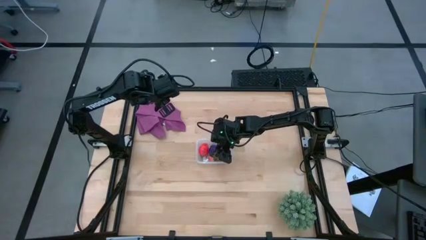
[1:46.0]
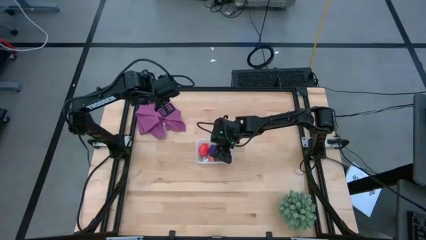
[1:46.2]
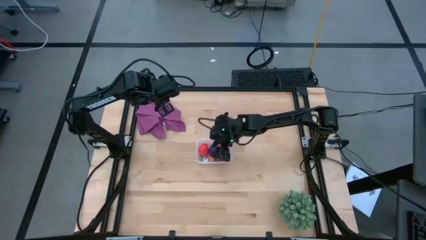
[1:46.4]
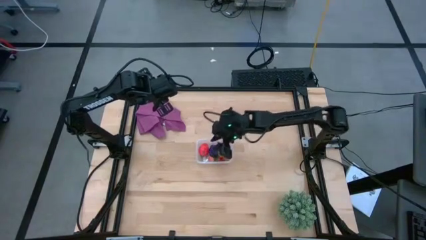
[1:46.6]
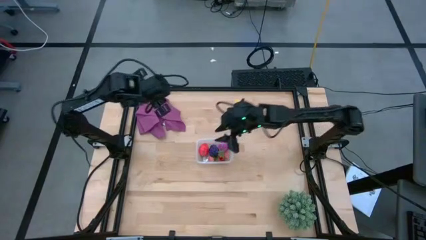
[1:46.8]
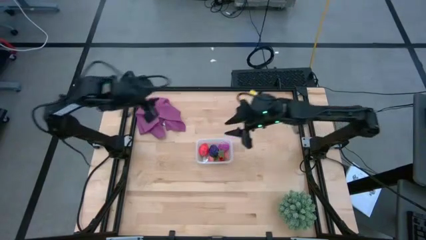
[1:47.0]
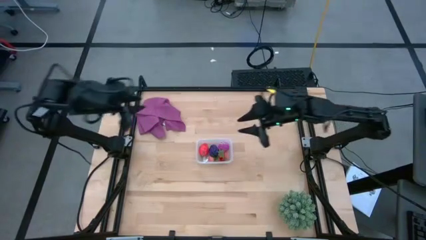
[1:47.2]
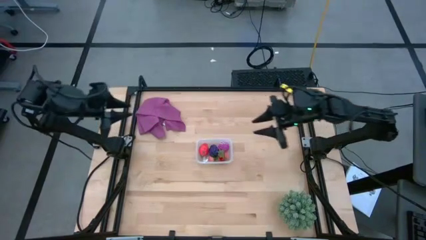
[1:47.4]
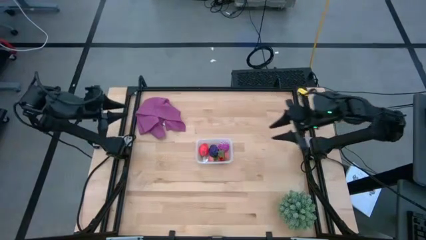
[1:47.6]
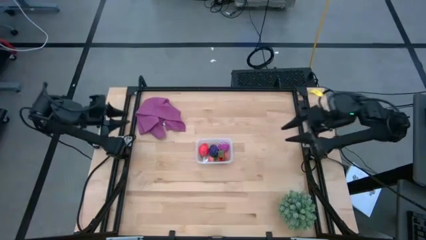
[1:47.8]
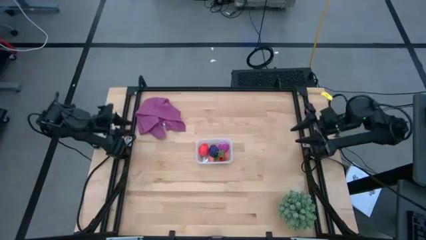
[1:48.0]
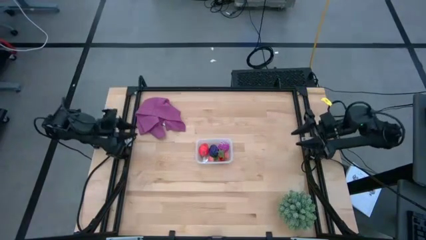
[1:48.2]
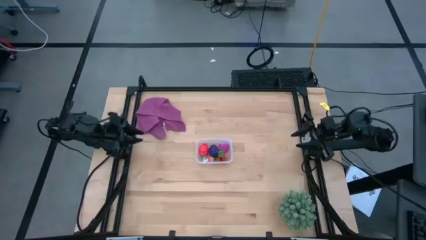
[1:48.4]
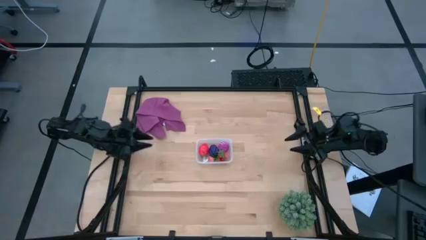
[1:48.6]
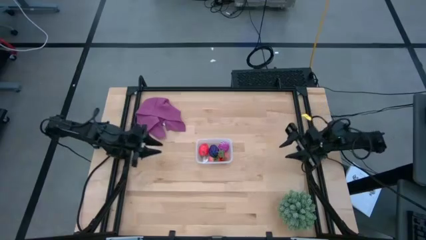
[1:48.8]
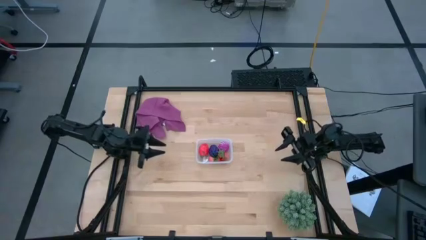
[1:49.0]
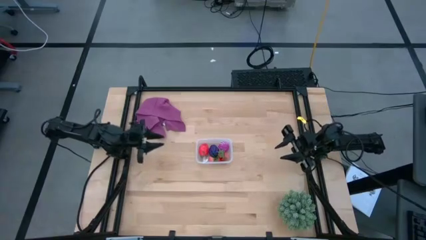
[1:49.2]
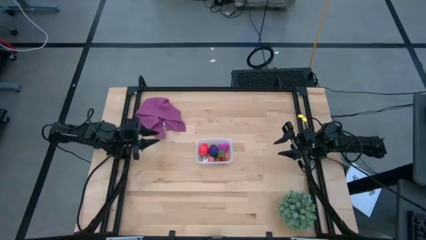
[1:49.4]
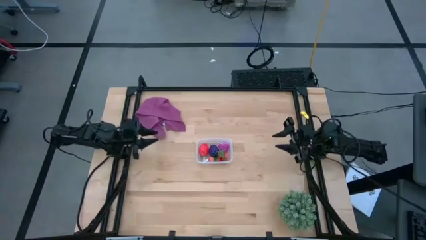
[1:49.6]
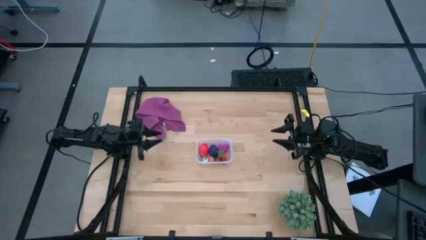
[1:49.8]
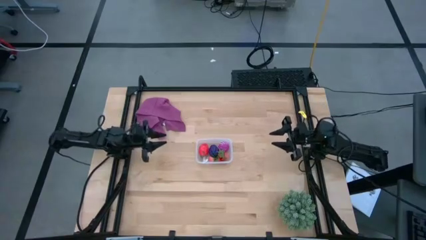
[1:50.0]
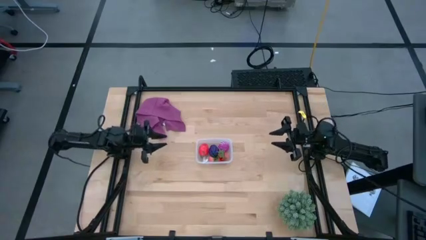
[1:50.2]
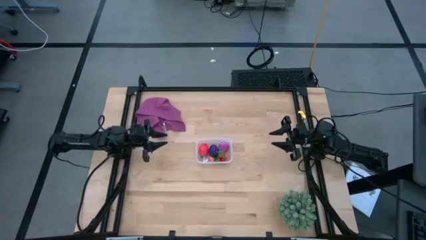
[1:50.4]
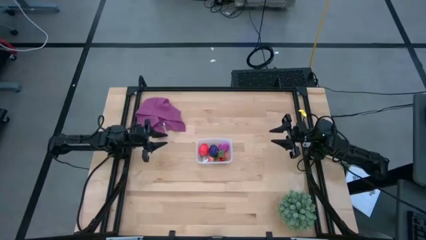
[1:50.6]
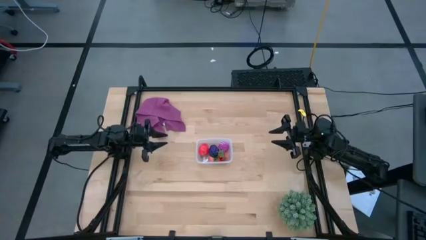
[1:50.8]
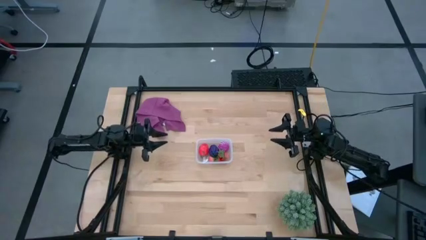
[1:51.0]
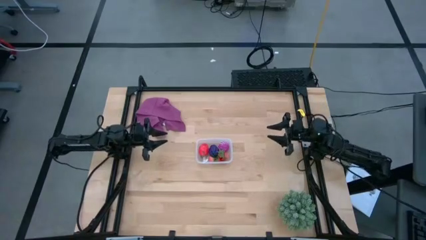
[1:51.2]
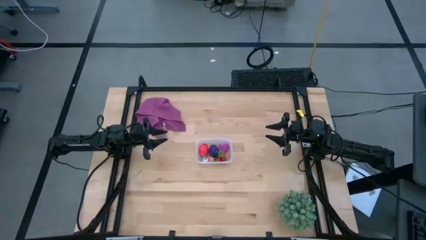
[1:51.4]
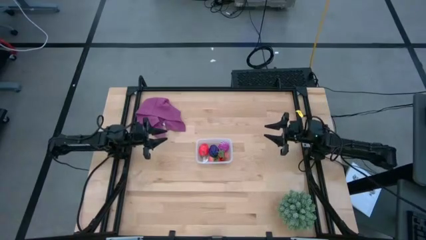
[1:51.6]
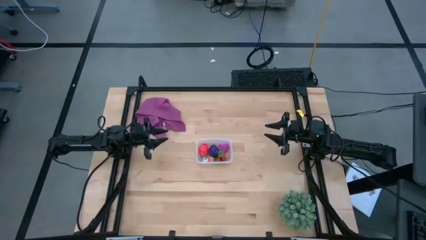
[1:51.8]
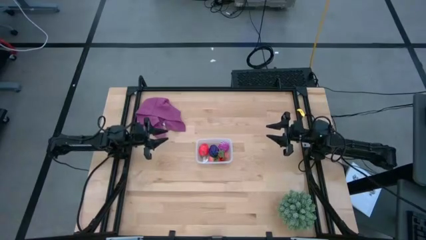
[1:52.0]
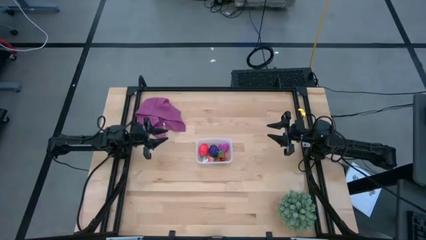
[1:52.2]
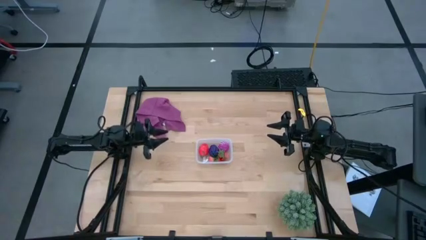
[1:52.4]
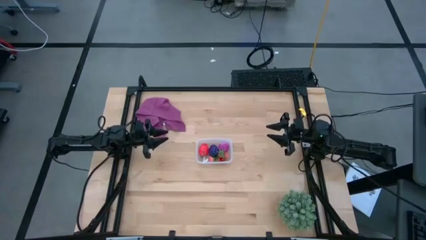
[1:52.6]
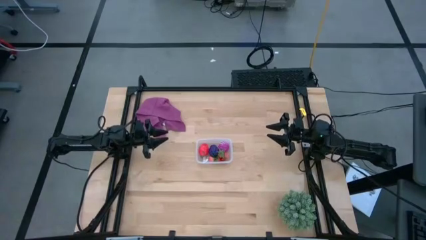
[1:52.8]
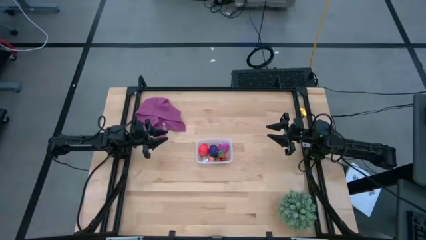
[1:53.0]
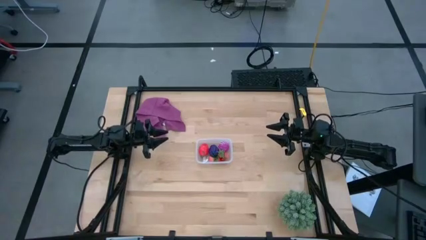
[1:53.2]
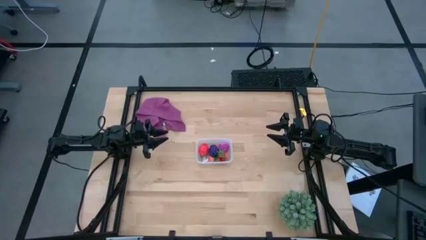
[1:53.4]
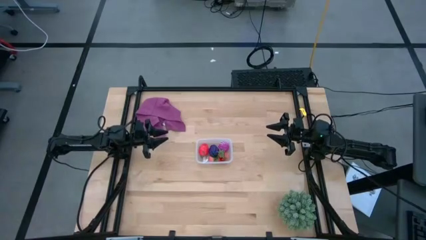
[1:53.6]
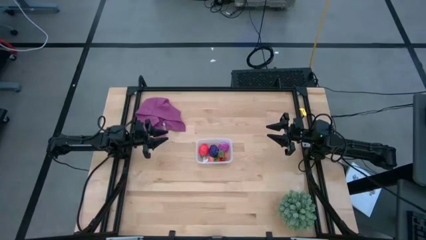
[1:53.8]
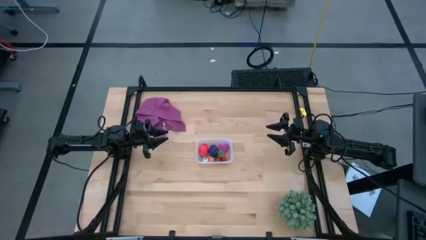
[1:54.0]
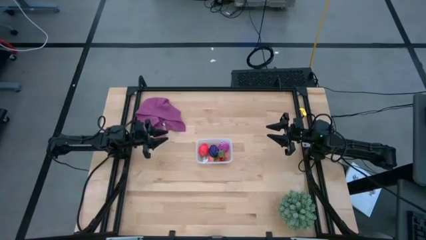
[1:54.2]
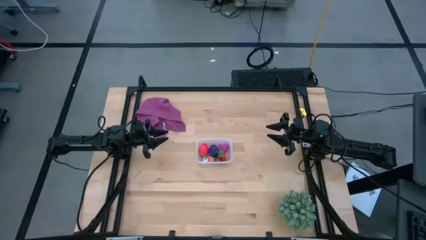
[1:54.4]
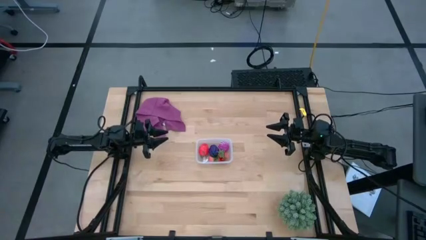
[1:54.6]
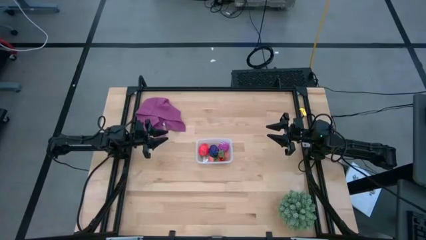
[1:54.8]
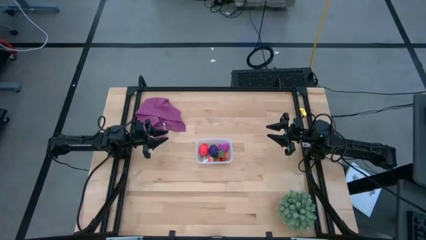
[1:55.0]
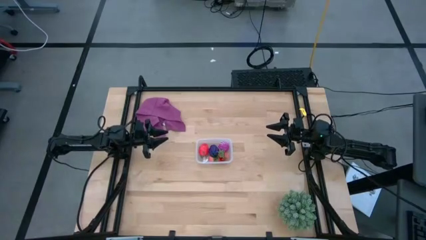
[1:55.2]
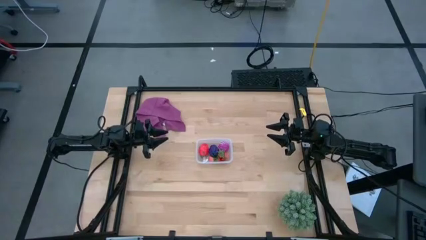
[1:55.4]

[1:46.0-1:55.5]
Task: Pick and placing Produce into tupperware
Return to Home Position

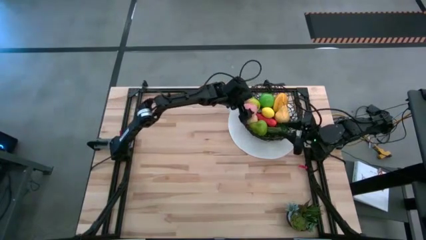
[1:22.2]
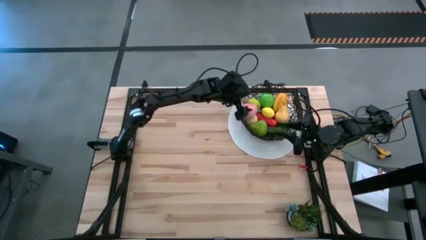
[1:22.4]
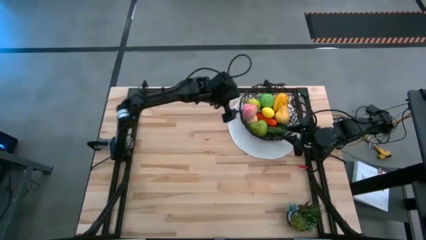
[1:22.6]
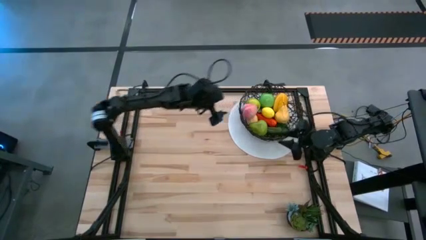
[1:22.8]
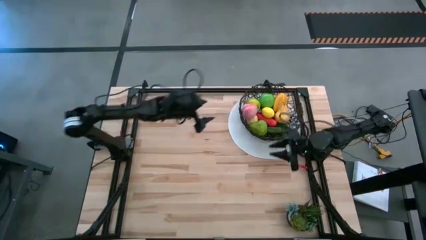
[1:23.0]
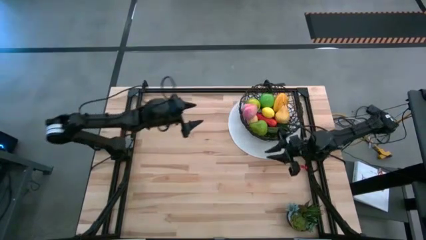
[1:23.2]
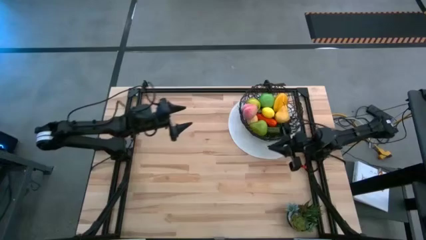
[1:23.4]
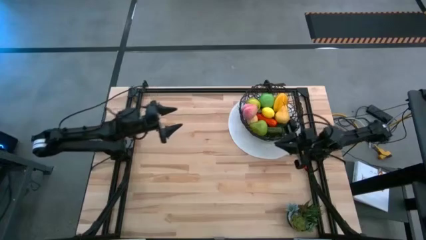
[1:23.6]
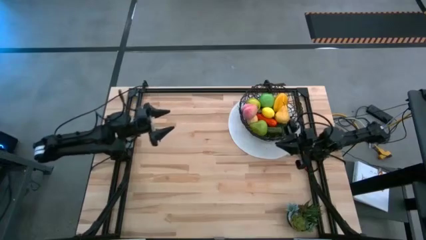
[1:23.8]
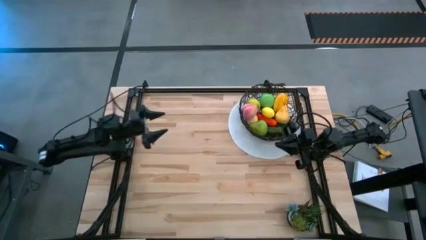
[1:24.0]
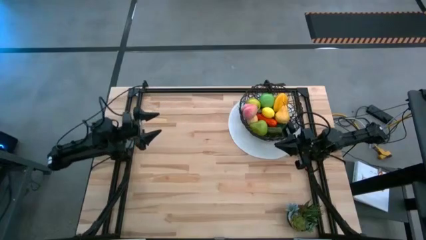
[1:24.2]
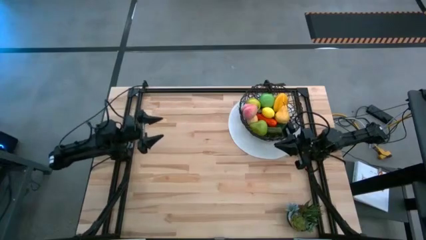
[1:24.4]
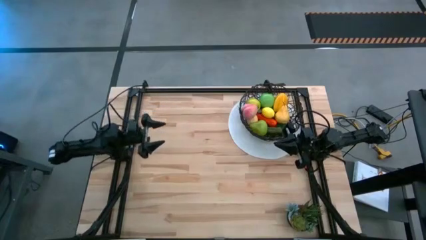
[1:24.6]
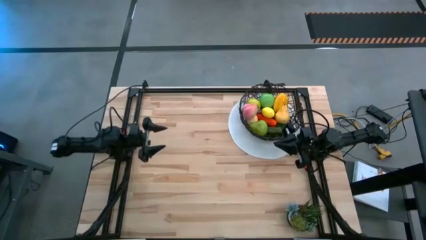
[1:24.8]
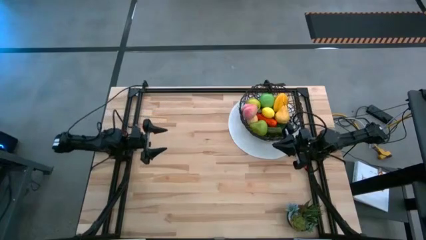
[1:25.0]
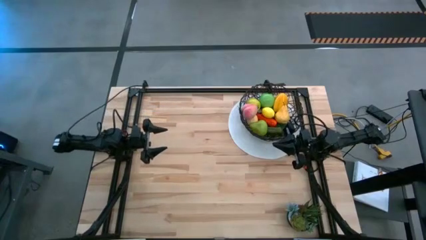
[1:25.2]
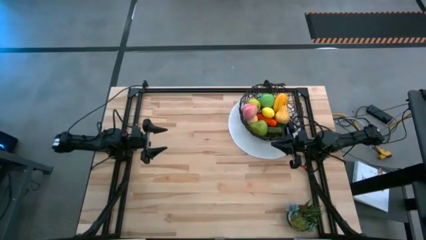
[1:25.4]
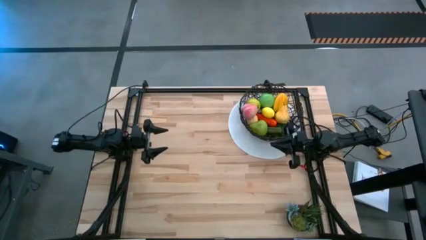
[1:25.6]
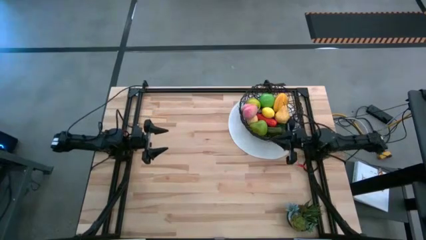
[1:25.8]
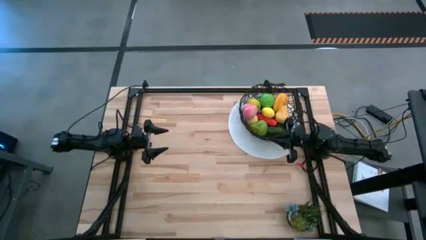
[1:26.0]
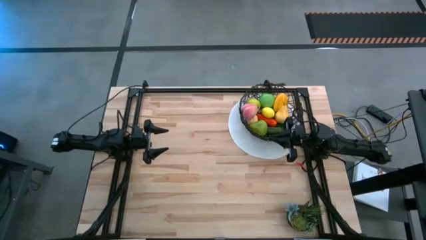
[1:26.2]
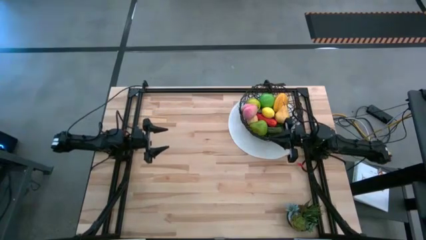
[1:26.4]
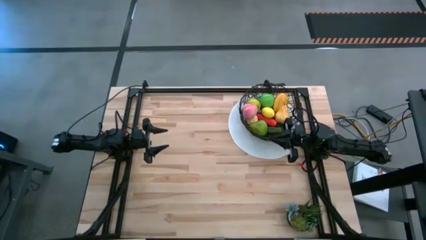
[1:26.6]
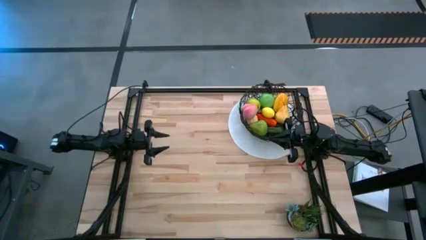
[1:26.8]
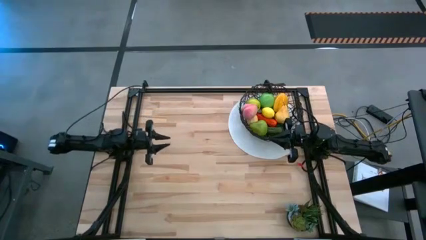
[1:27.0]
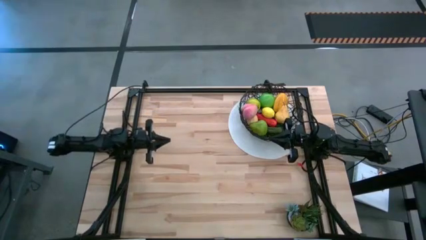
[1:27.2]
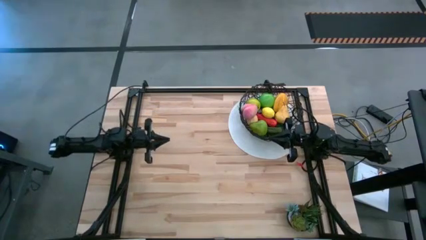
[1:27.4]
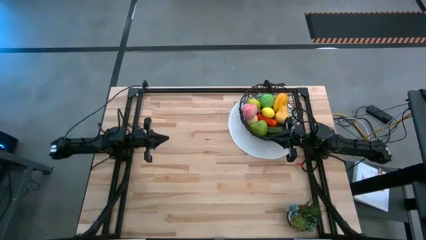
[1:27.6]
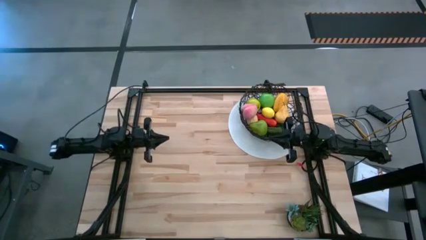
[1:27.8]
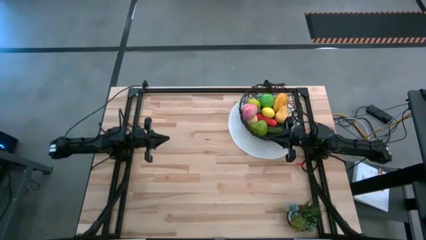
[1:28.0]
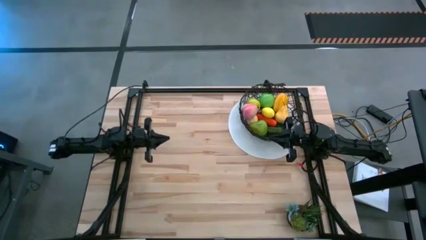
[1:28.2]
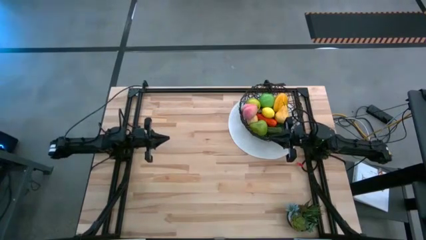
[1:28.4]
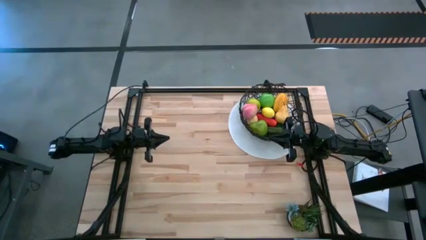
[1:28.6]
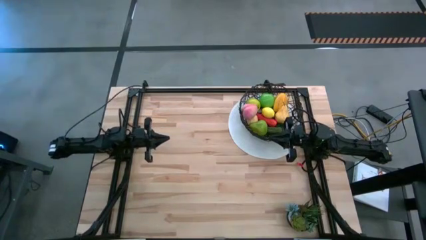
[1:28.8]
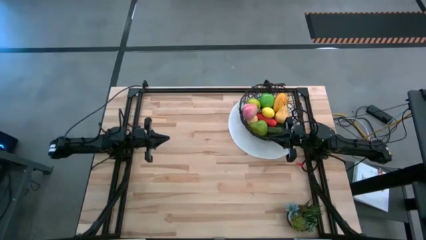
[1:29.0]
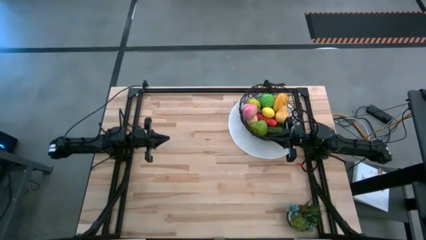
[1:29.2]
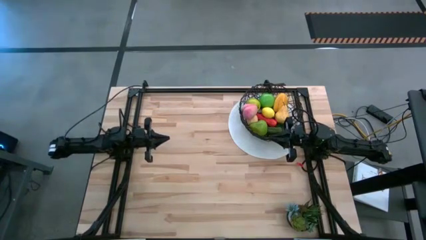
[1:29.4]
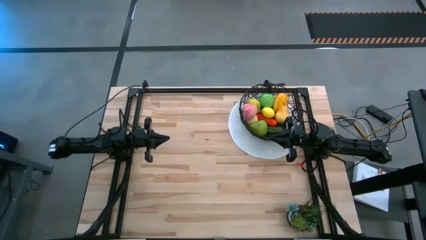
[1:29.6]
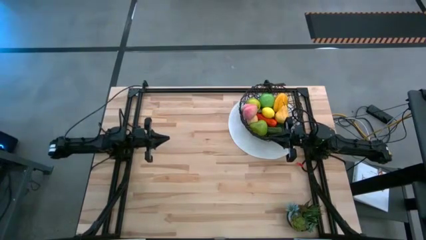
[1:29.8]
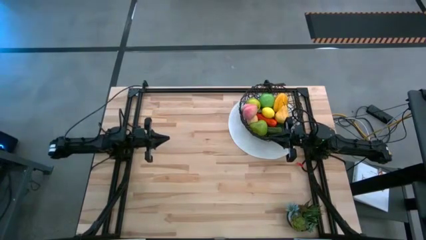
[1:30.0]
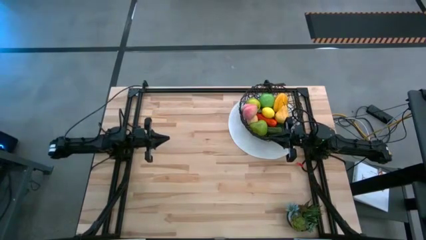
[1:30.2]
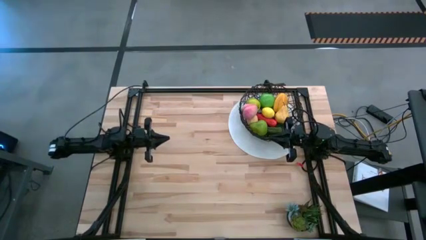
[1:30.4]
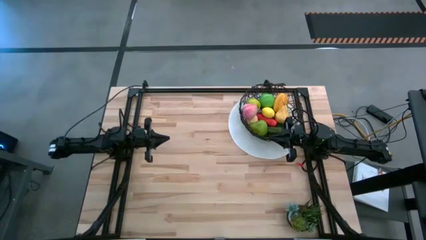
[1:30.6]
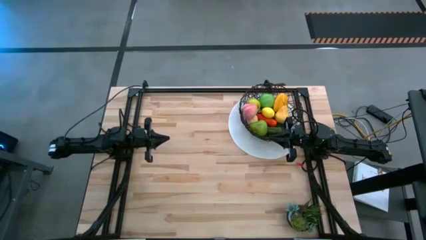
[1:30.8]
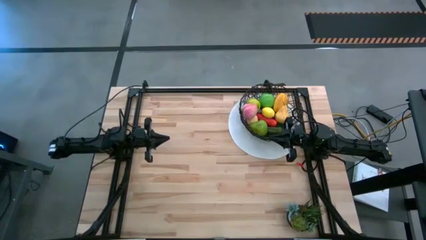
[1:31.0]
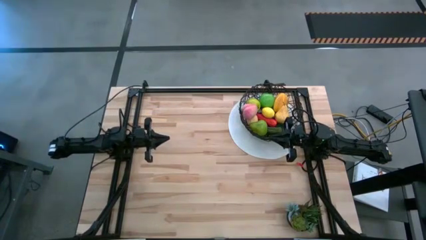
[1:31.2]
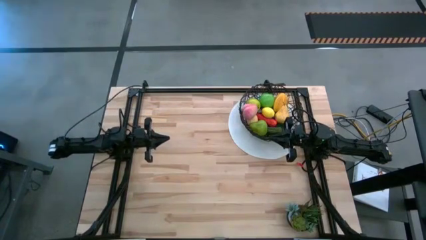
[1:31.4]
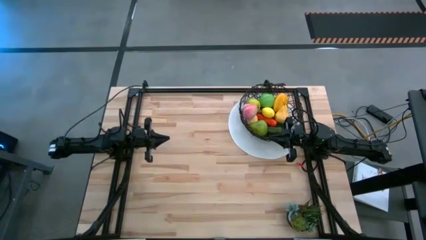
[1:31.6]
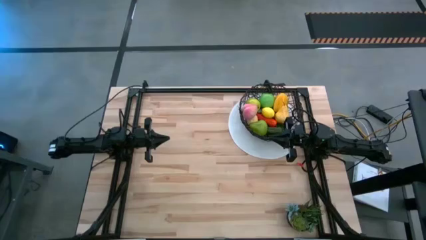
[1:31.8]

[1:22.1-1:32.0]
Task: Build produce basket
Return to Home Position
